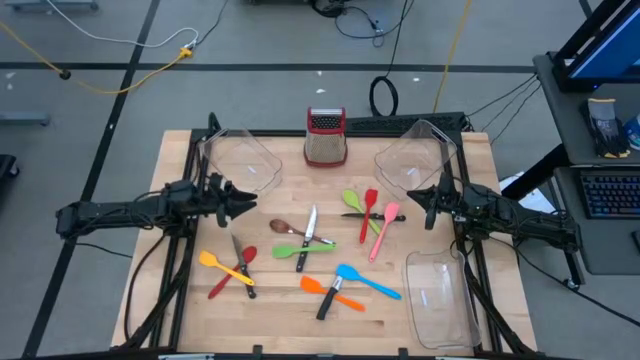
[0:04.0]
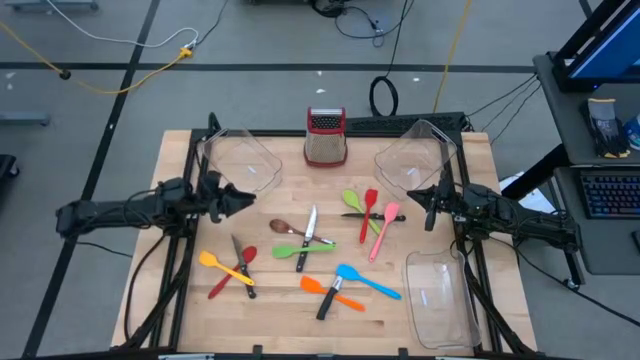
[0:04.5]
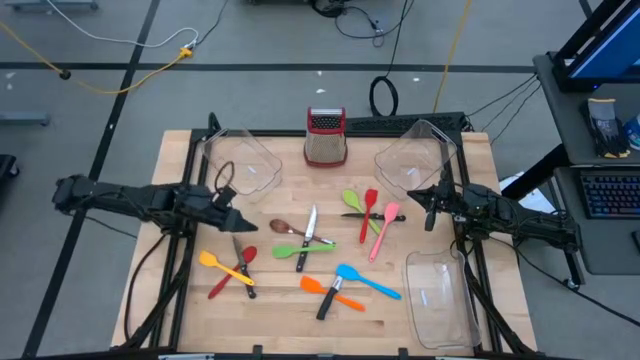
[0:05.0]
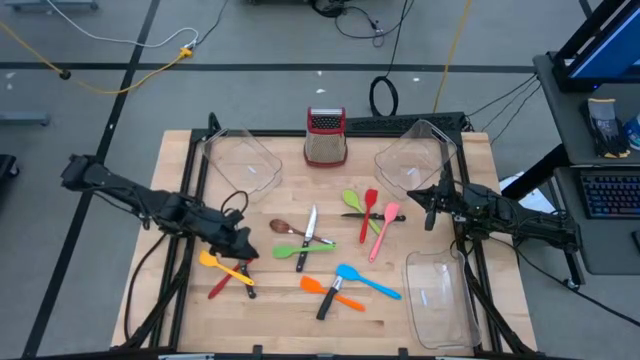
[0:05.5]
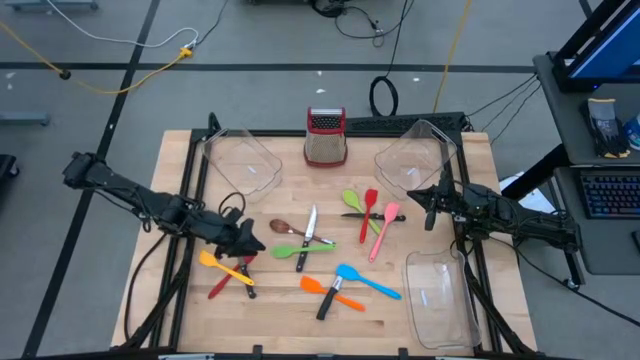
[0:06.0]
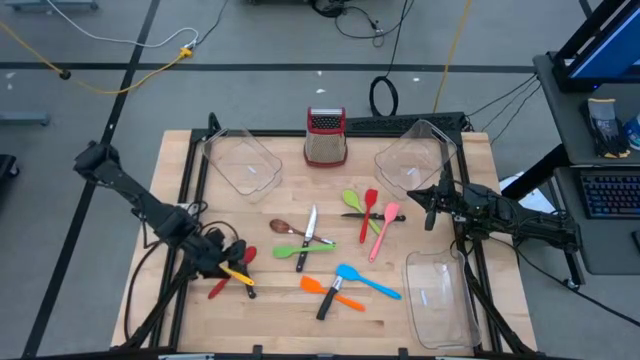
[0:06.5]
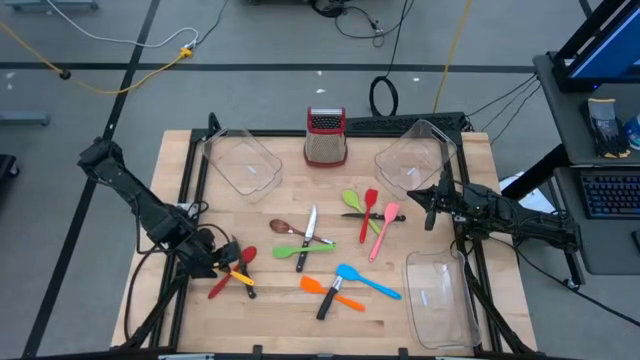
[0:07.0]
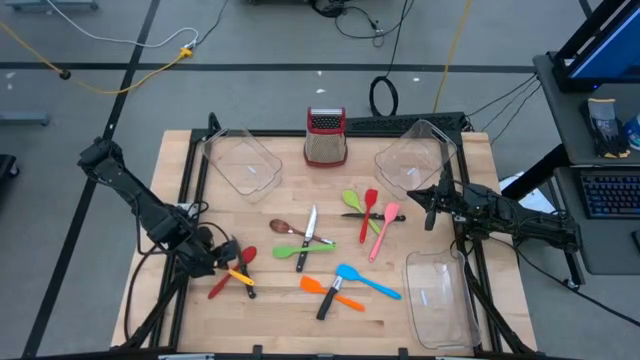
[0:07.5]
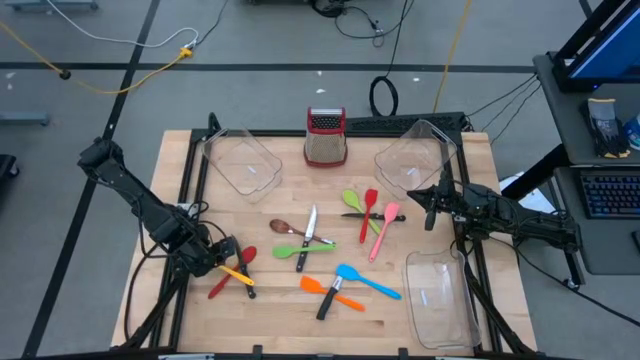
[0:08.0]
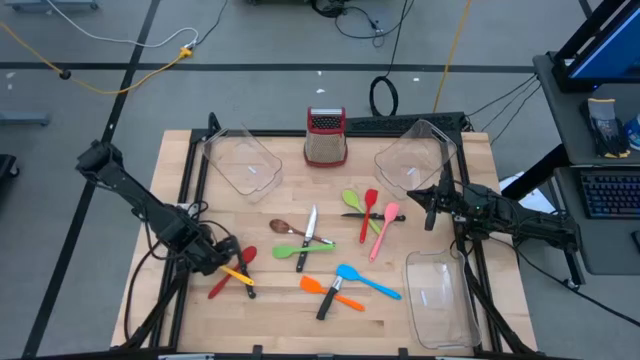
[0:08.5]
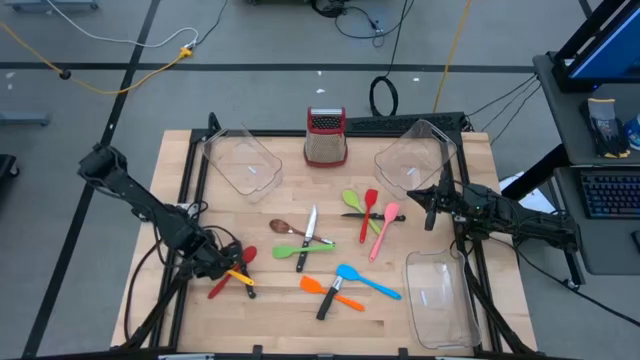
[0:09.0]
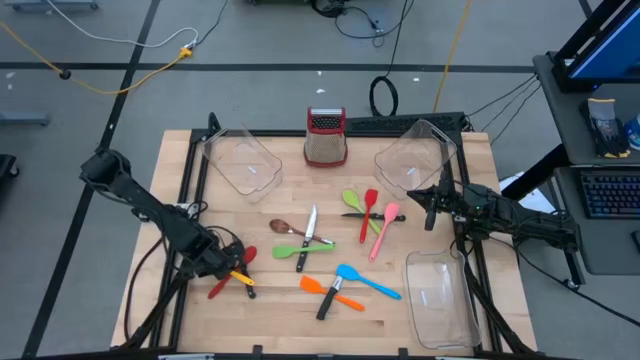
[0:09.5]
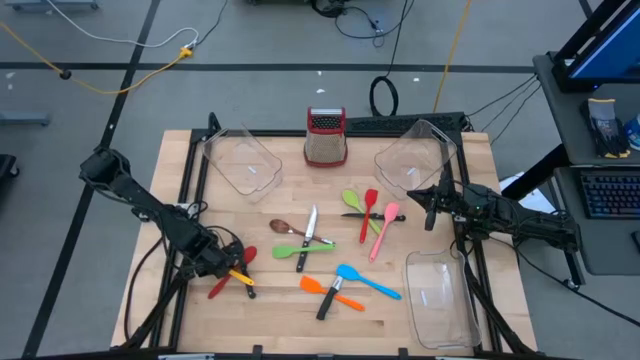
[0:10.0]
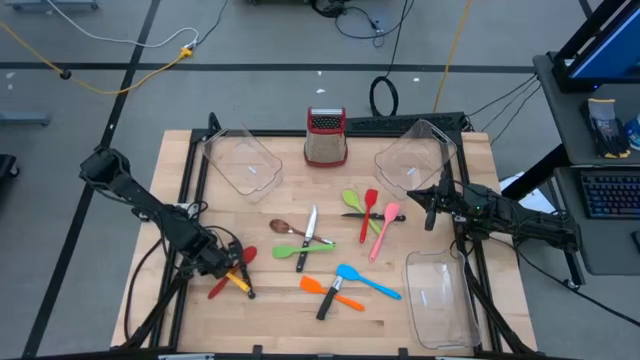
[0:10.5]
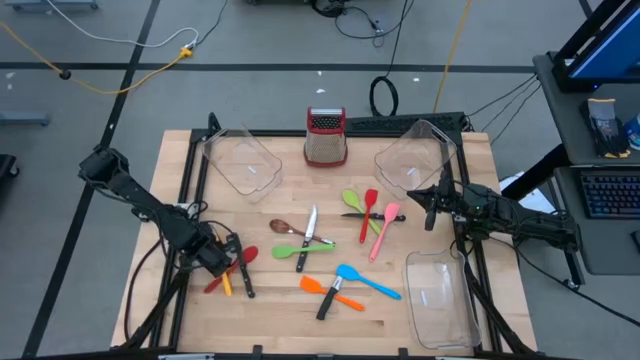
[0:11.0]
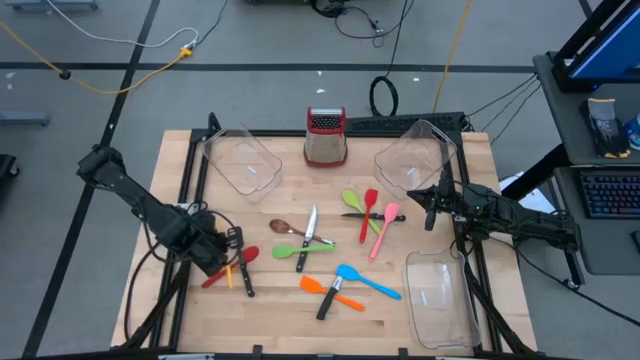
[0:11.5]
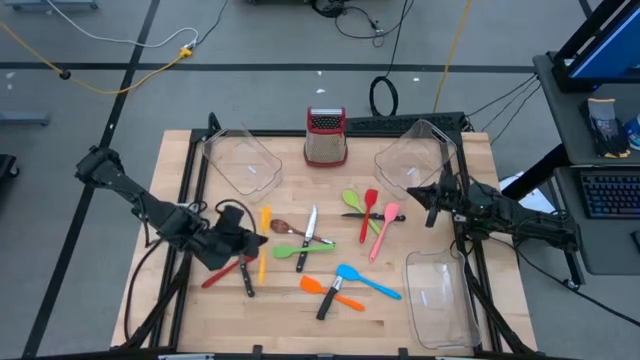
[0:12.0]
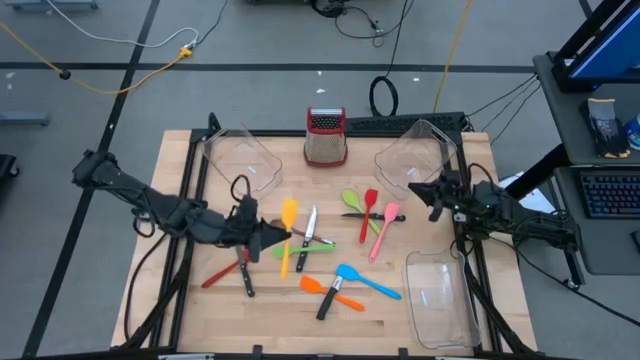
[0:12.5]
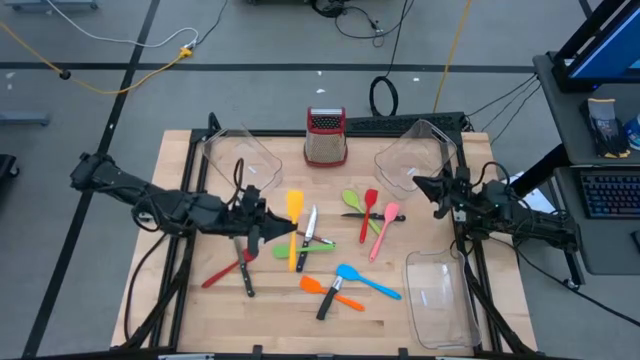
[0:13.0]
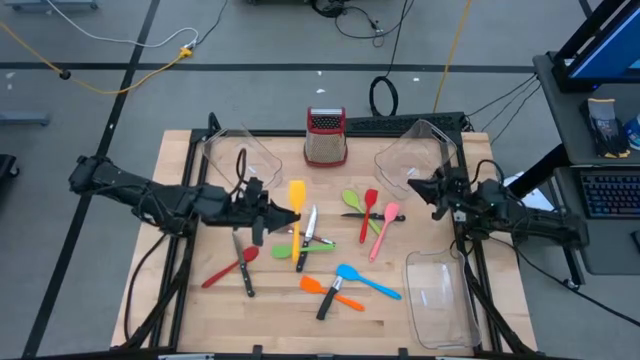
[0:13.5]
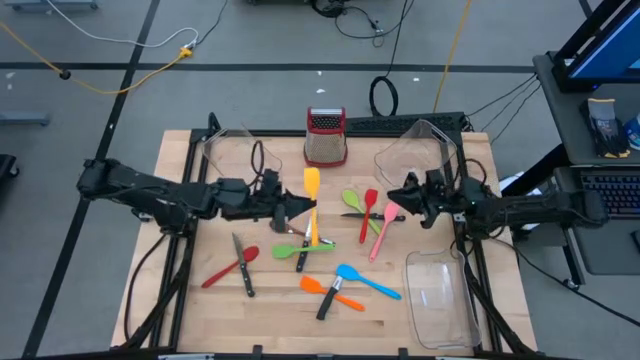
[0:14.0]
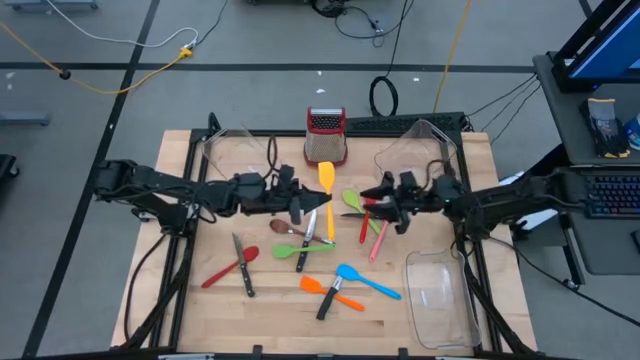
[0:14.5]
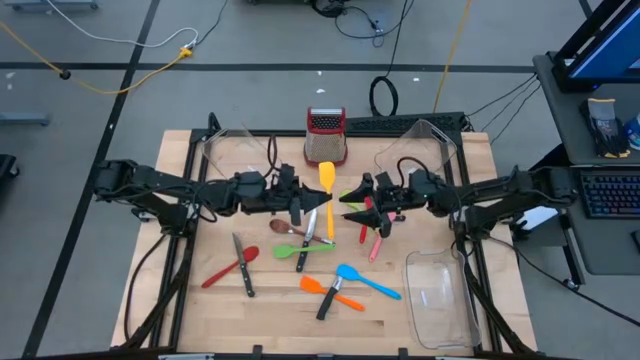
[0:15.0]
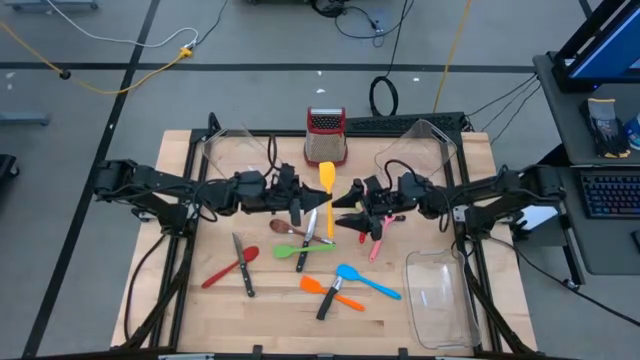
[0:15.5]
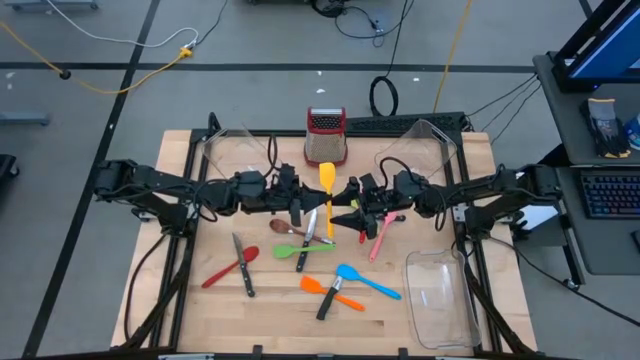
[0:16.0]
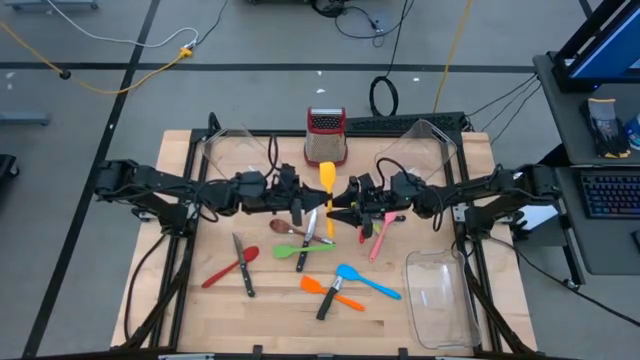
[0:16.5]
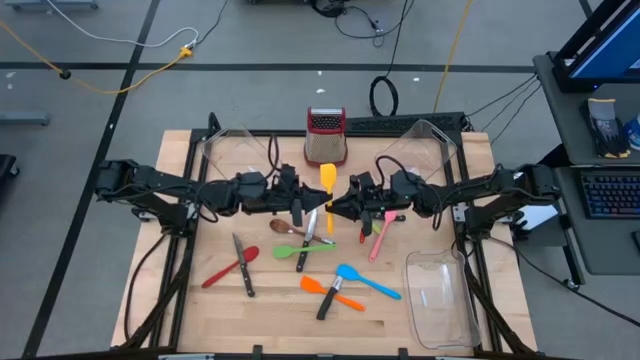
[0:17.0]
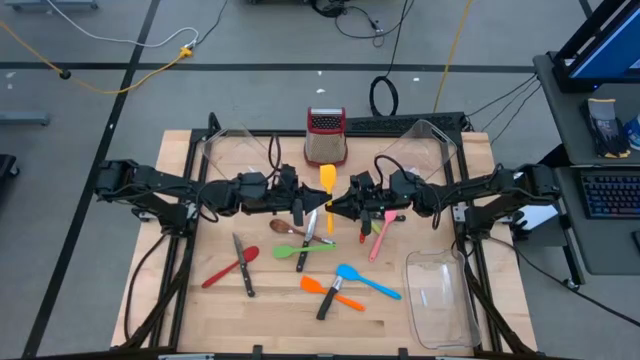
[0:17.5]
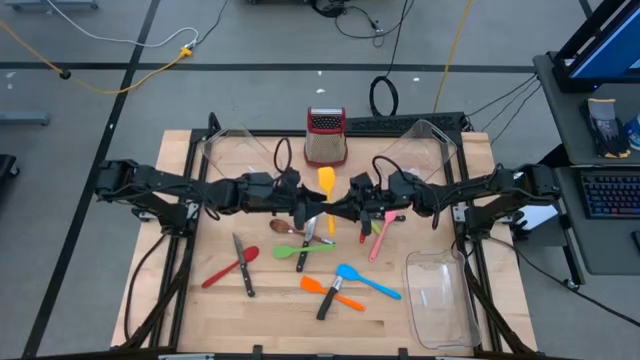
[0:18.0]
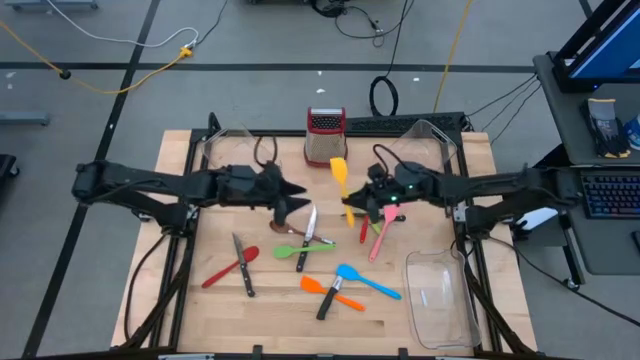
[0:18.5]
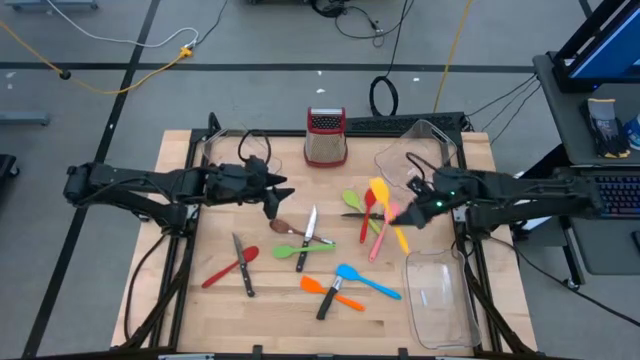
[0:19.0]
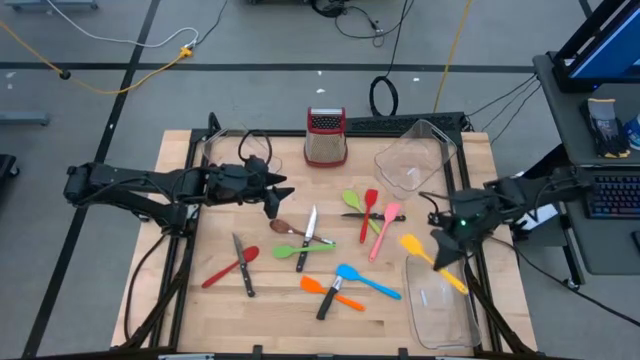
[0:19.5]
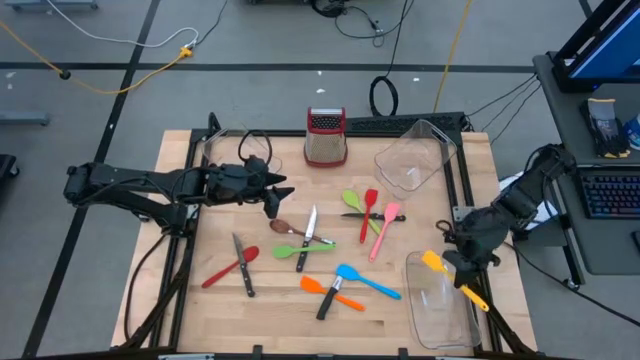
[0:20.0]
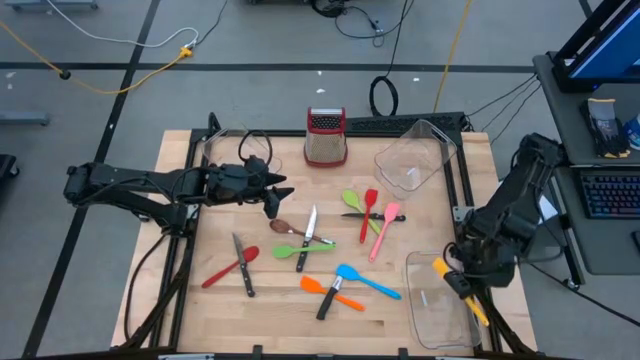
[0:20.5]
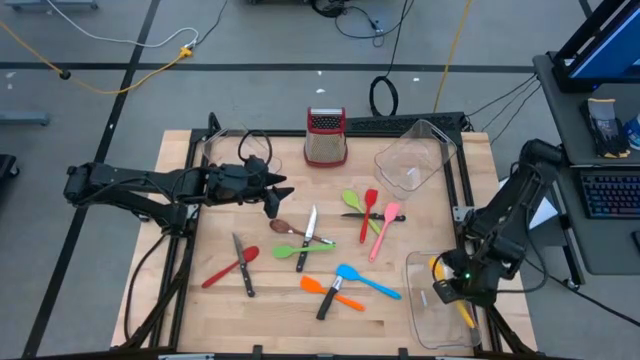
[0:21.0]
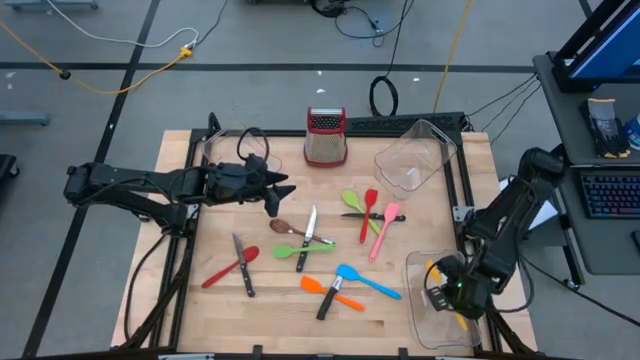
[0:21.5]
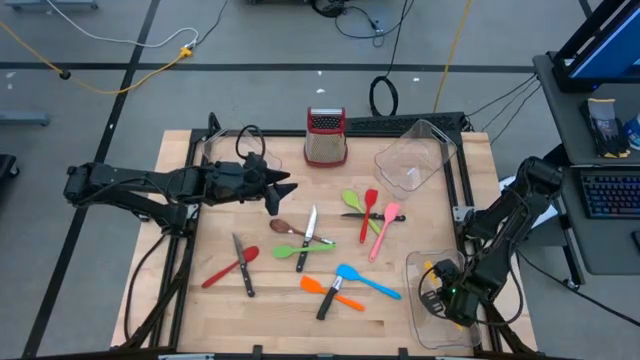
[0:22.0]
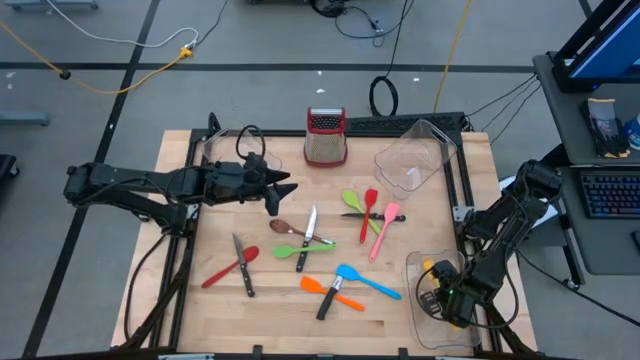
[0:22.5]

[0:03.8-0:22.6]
Task: Pick & Place Kitchen Items
Put the yellow spatula into the bottom transparent bin

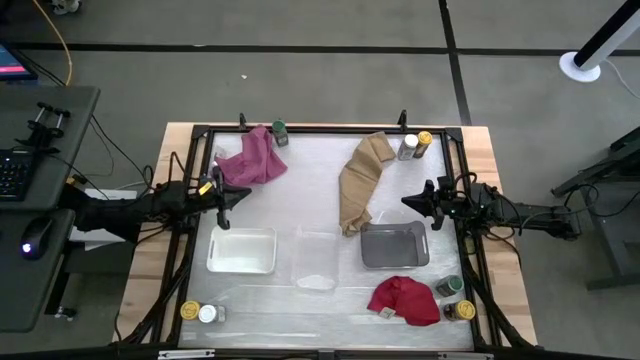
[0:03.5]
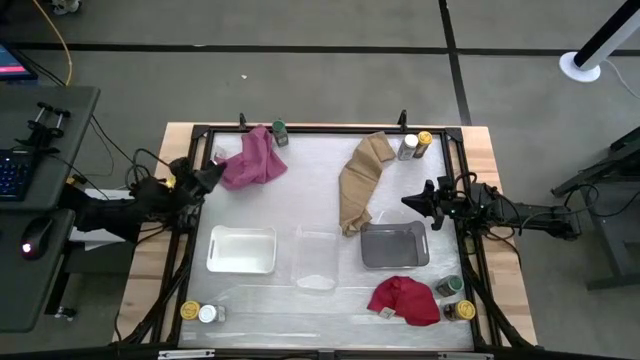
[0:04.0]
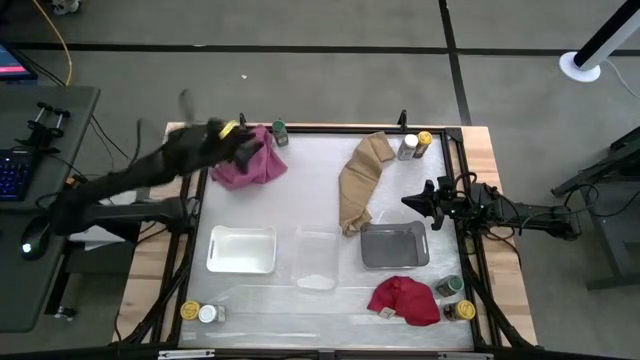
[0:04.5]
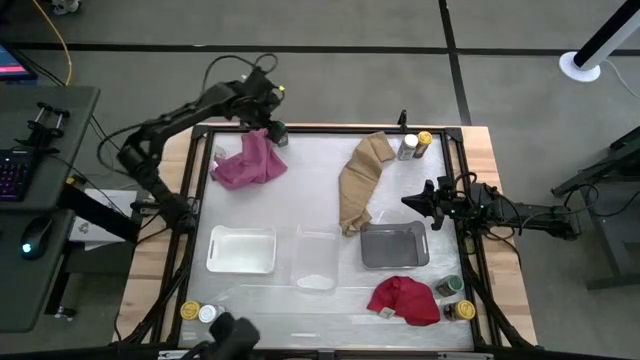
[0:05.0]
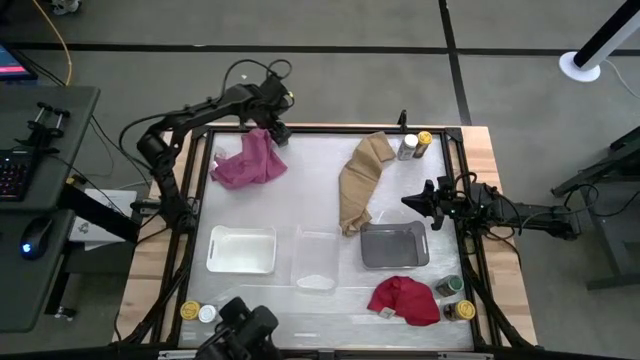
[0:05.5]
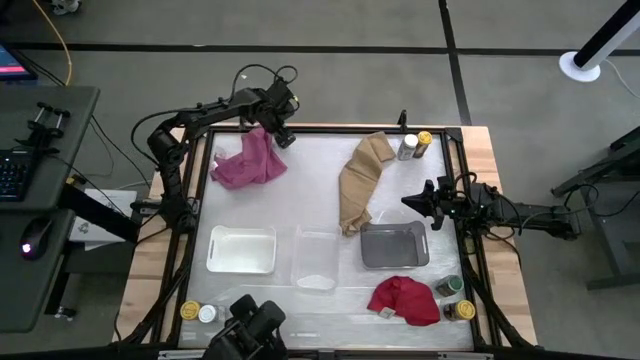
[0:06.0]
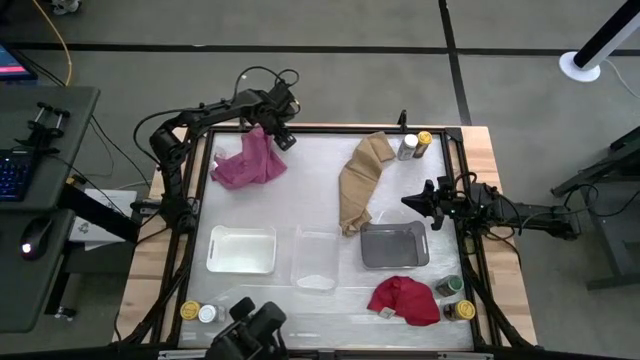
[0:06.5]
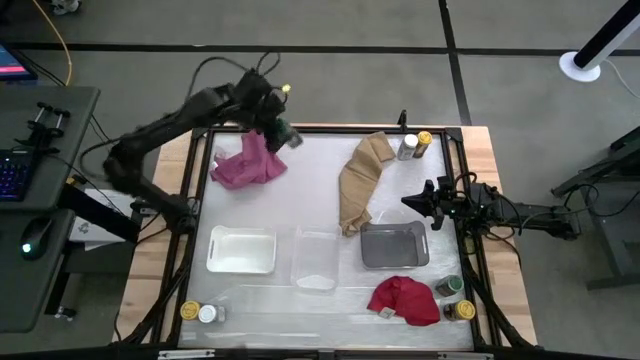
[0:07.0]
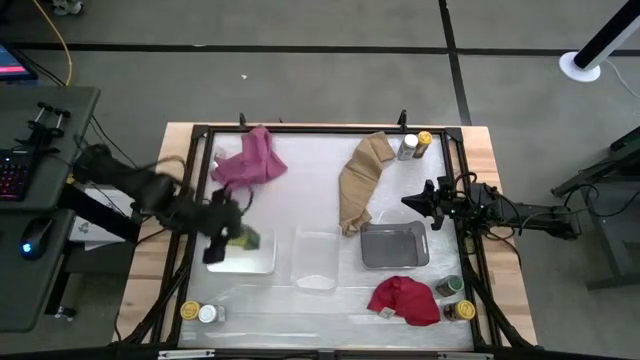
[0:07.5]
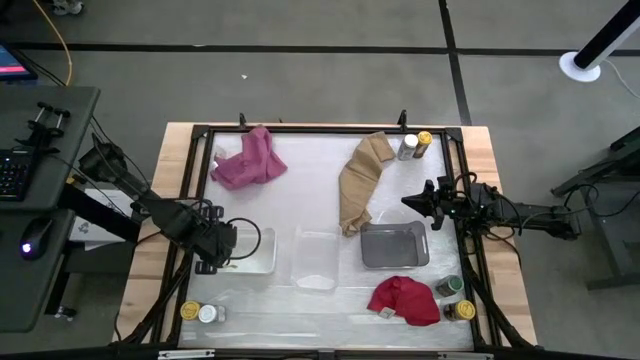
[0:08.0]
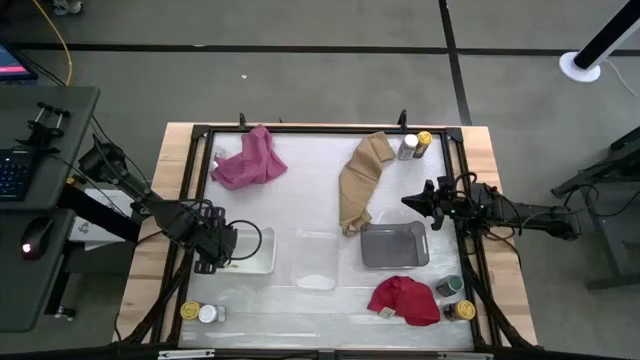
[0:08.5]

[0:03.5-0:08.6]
Task: Sort spices by type
Put the top green seasoning bottle into the white bin
